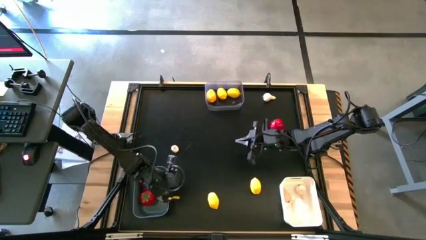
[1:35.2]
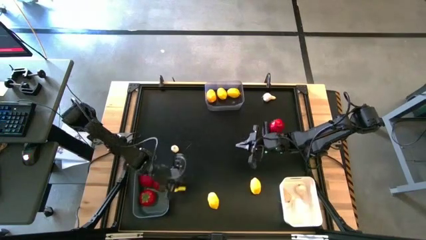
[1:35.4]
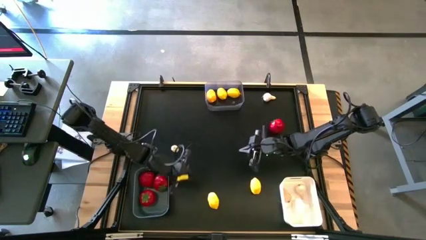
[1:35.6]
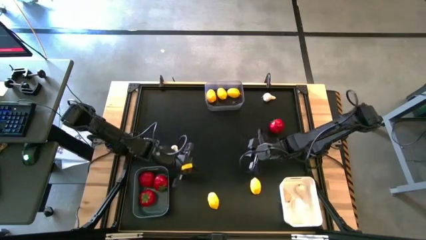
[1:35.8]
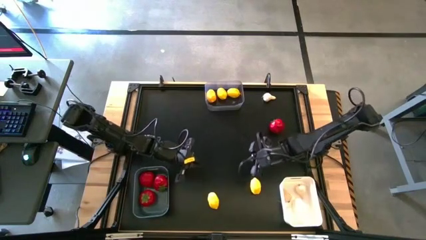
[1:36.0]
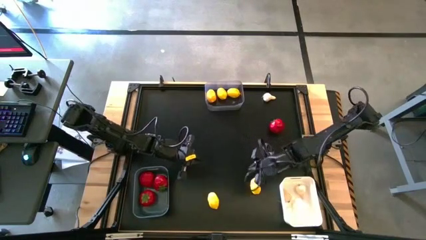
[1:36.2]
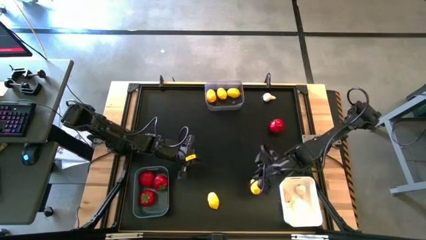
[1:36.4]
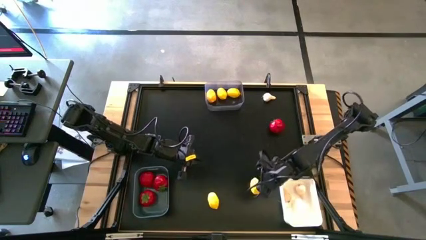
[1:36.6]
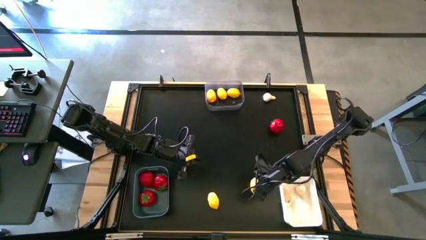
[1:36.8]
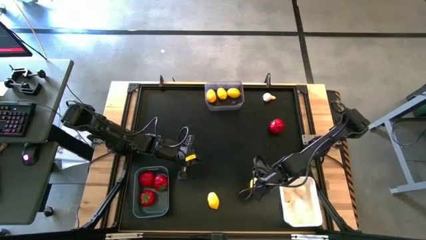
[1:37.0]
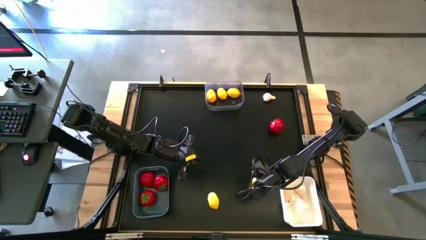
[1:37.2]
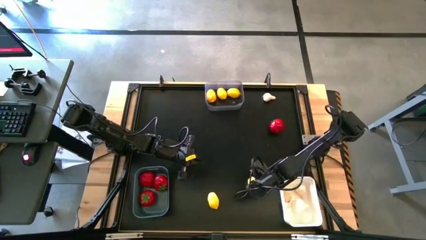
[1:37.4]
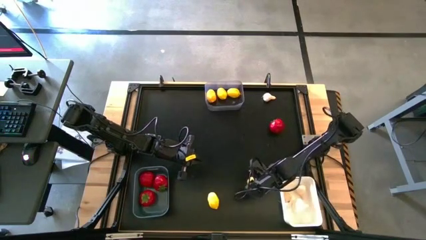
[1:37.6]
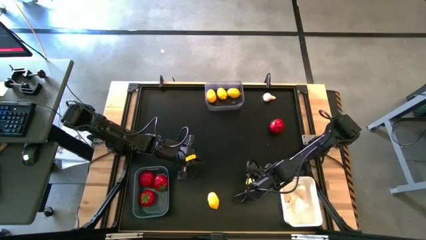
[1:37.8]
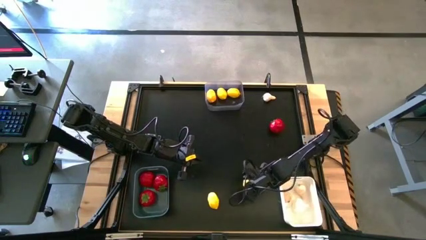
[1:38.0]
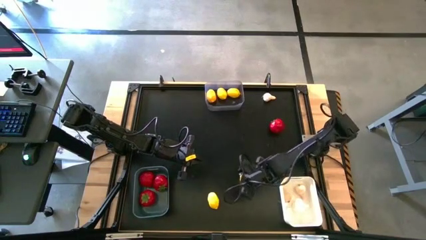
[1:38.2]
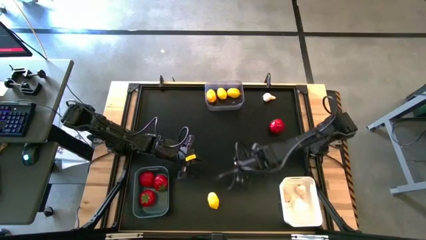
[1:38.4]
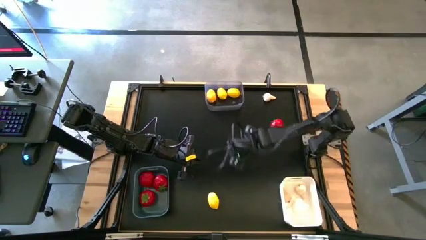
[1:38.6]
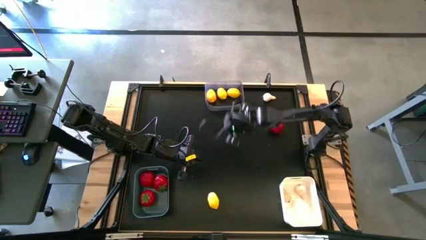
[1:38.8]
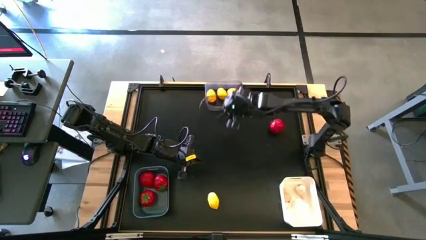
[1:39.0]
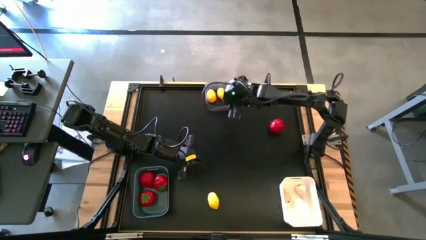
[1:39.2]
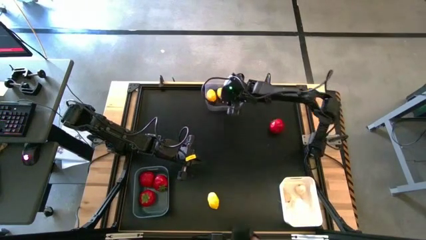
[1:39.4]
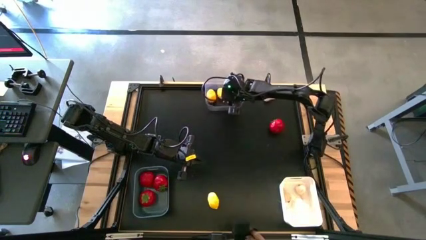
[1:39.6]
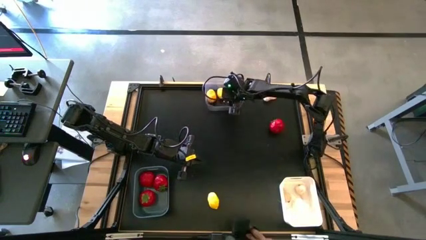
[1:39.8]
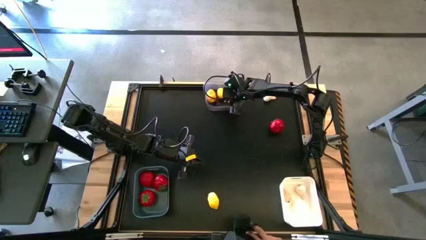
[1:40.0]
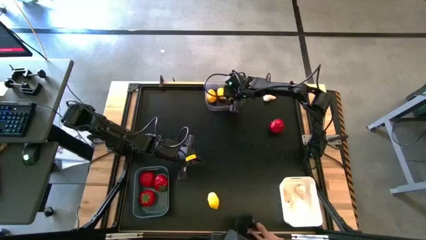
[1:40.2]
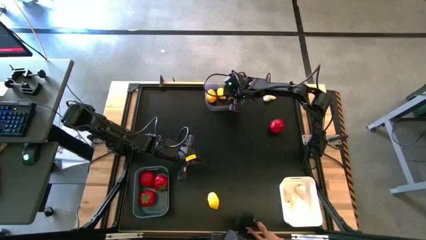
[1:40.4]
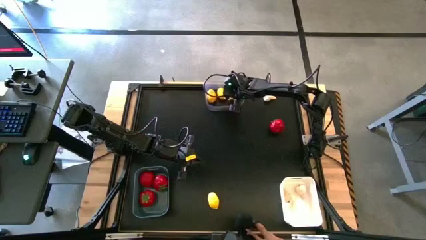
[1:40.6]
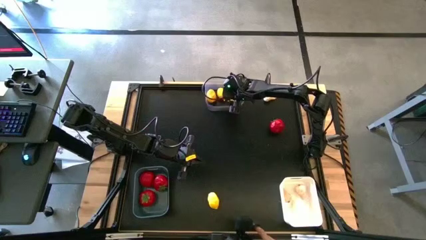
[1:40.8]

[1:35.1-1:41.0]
Task: Sort produce into baskets
Put the right lemon into the transparent bin

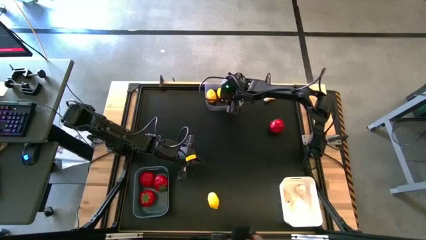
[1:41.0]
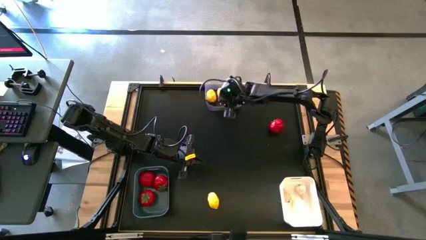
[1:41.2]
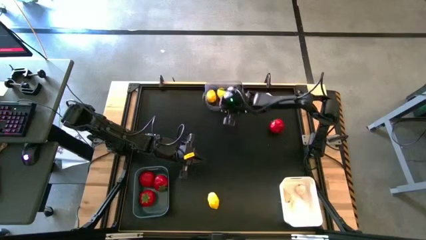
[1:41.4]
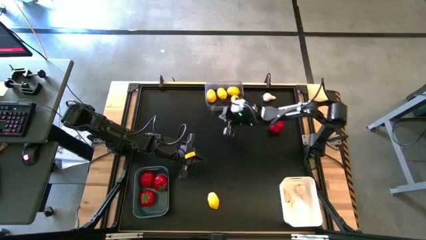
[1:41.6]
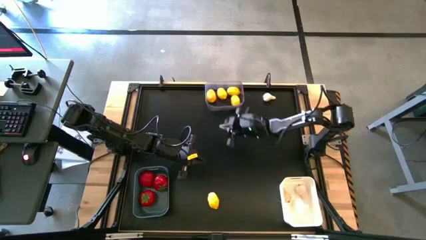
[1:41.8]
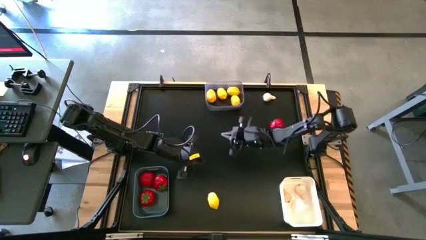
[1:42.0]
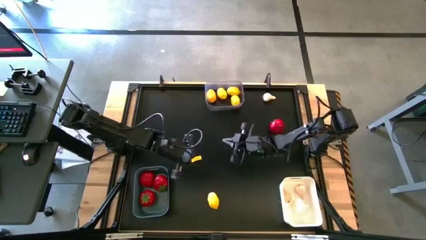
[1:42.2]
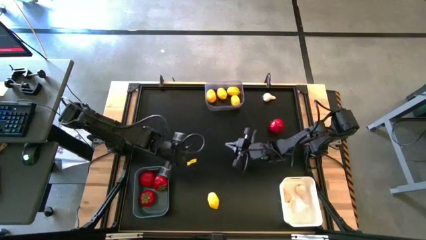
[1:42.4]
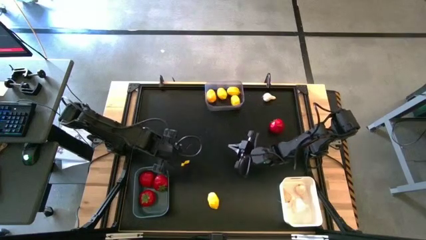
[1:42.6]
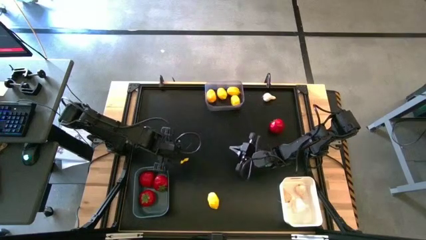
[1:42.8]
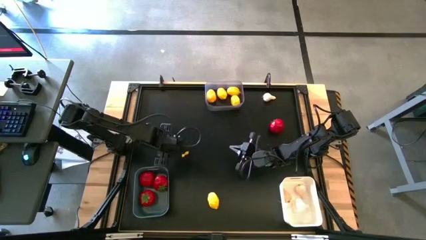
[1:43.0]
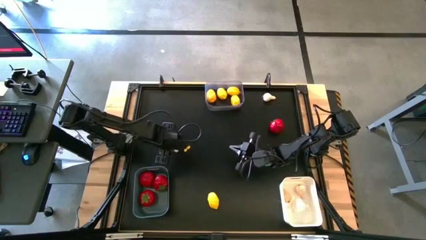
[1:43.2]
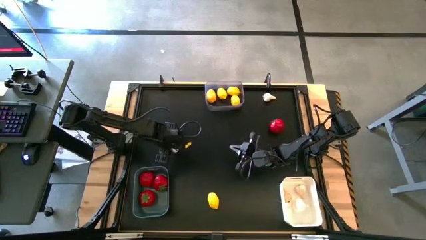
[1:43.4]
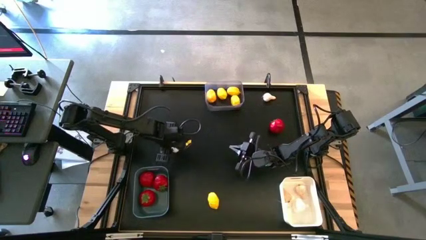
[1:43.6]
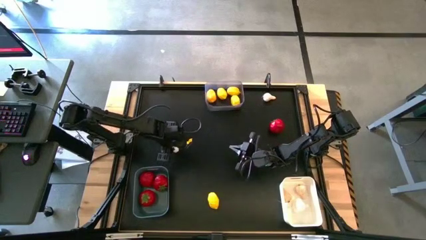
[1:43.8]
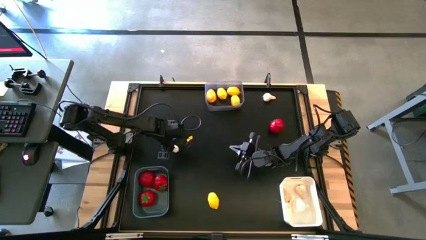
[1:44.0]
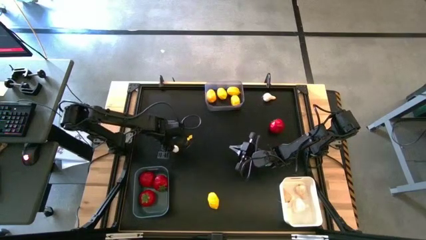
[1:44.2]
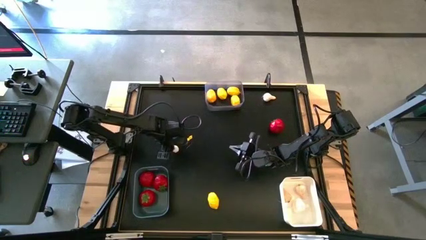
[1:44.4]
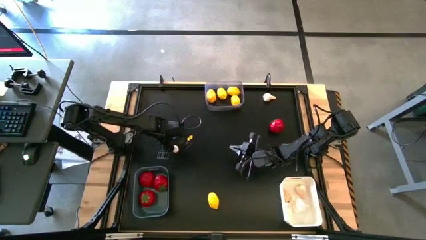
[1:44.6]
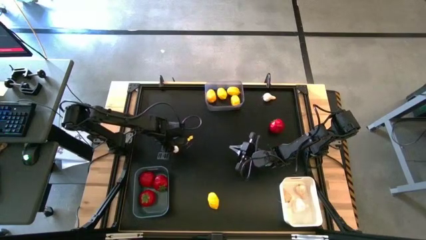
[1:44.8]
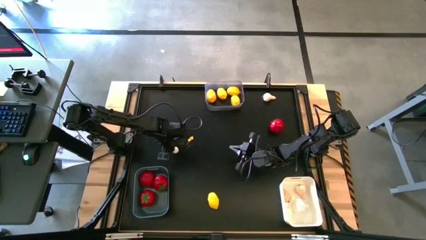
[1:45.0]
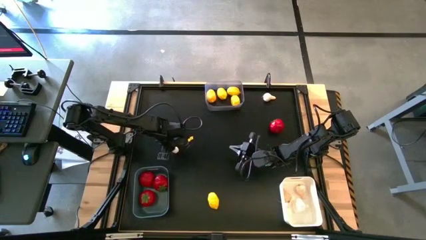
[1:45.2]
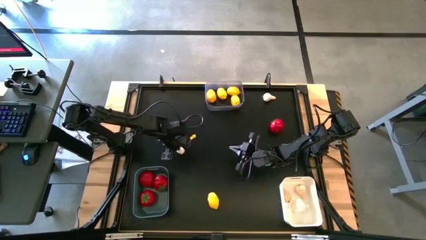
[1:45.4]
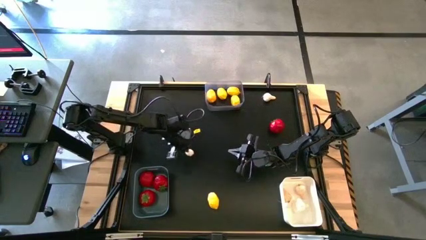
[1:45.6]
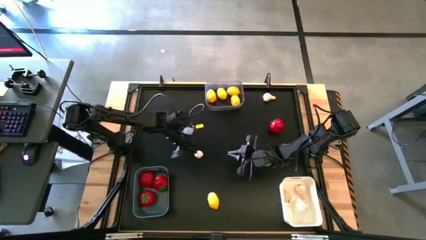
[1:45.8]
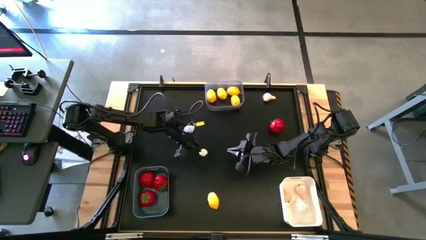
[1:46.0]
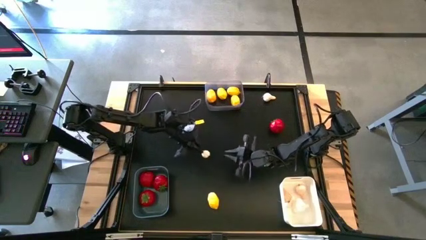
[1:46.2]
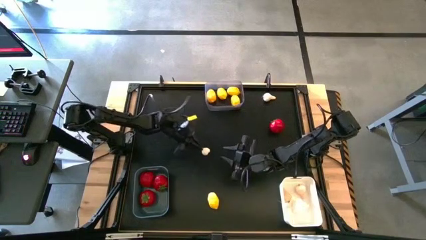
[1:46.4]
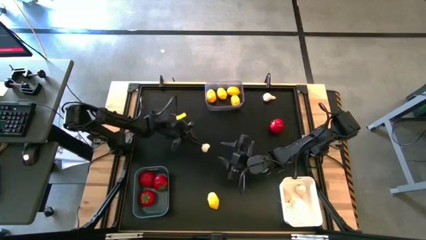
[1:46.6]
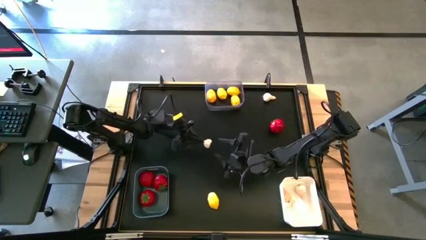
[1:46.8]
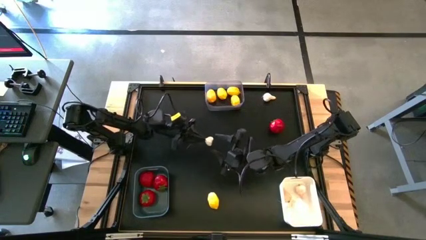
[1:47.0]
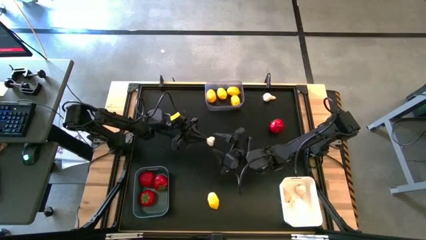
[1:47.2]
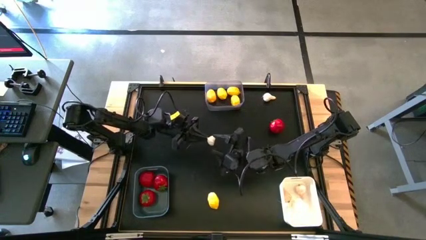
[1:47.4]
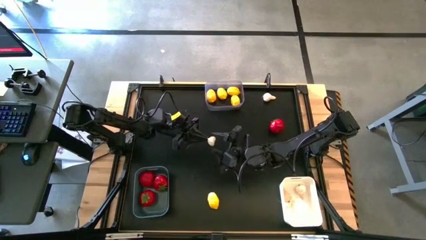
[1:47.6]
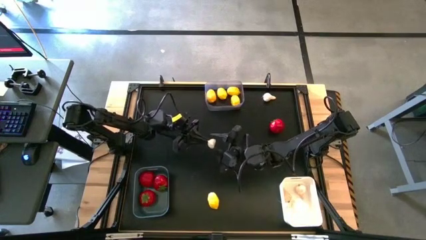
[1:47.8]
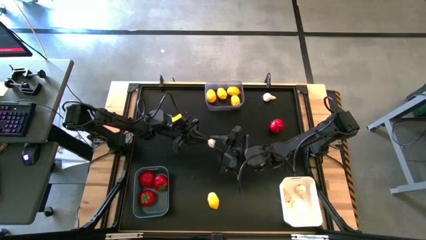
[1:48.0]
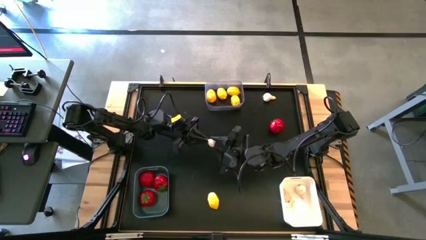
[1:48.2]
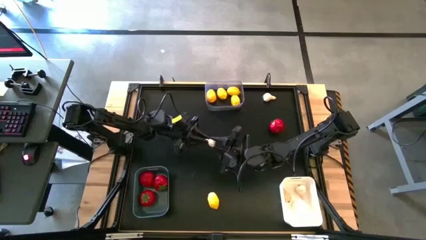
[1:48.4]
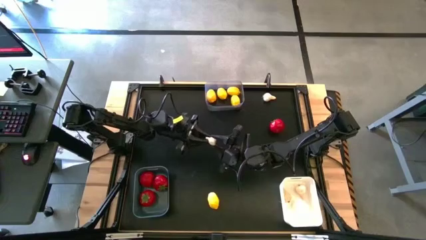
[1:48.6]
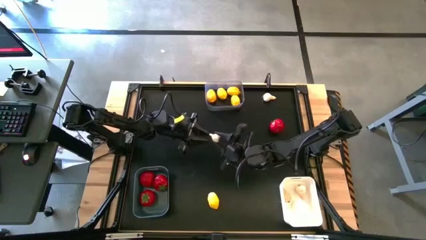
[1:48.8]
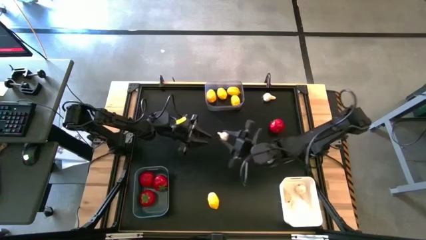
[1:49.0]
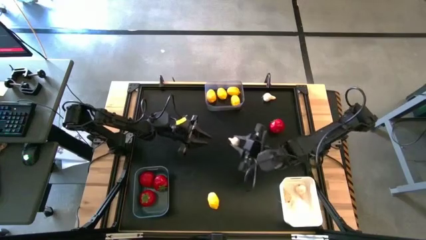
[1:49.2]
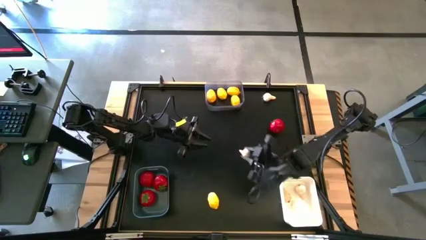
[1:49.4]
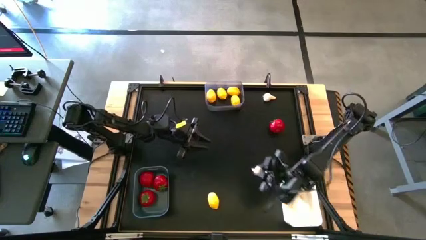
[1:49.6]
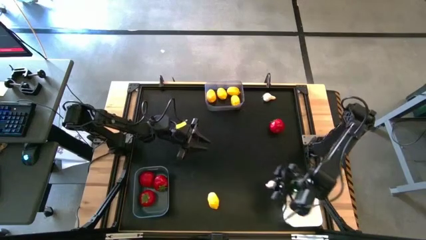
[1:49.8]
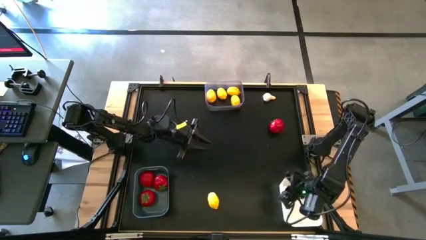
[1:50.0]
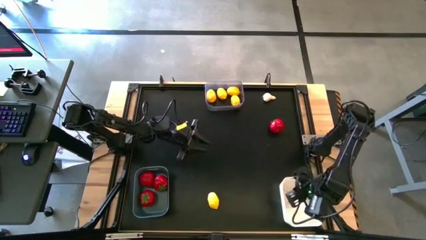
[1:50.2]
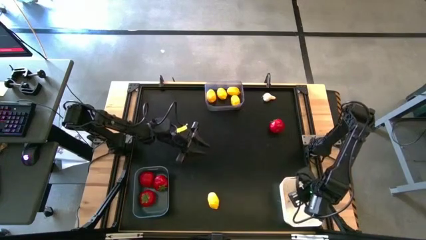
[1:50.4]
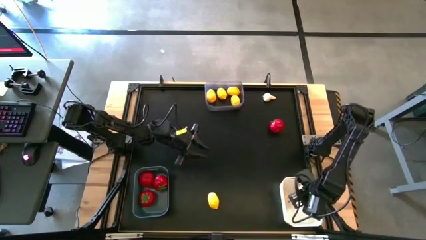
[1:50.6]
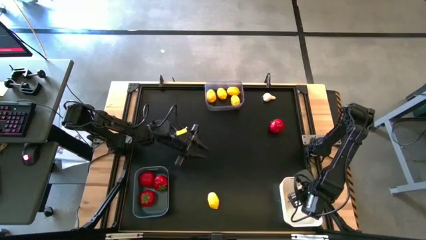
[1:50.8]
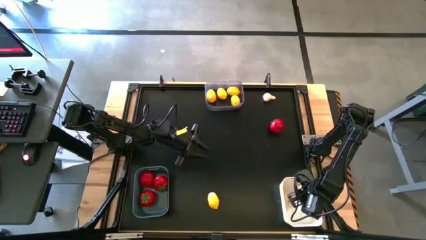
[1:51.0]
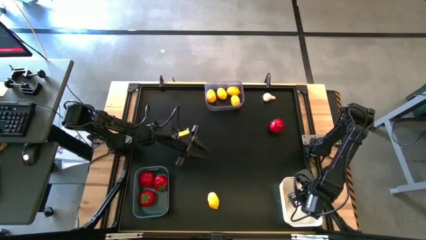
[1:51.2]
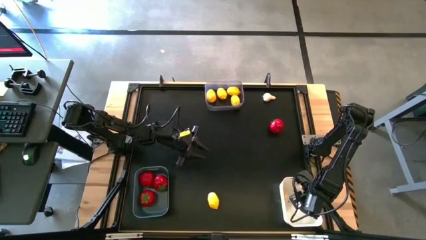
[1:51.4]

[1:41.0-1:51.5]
Put the left garlic into the white bin
